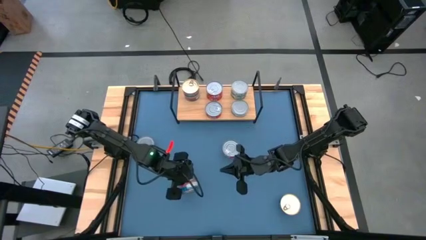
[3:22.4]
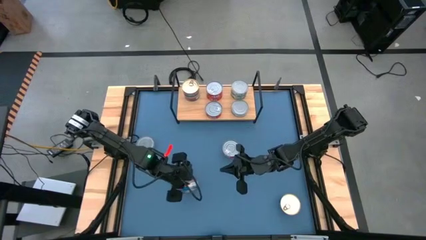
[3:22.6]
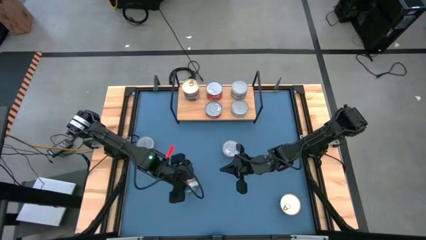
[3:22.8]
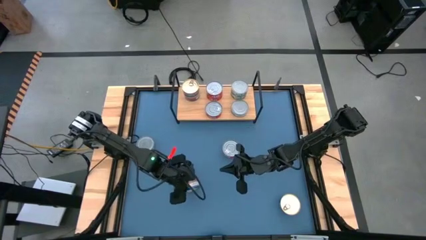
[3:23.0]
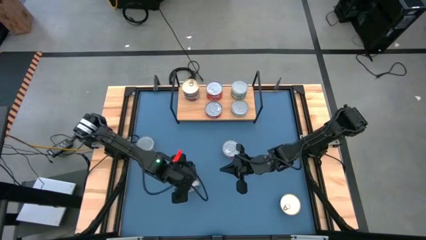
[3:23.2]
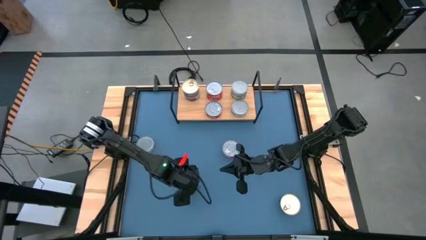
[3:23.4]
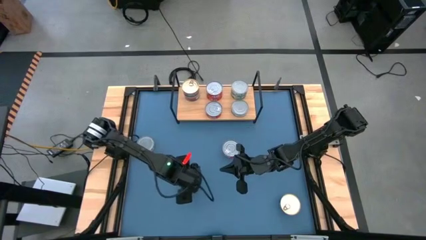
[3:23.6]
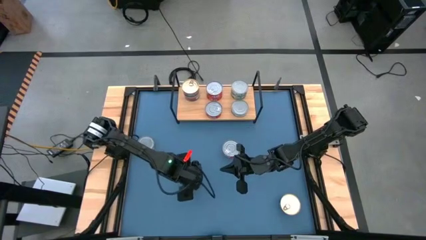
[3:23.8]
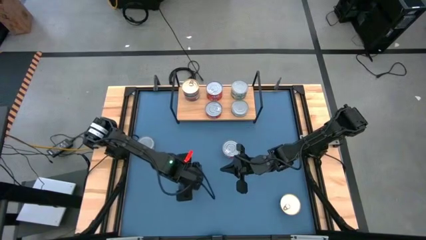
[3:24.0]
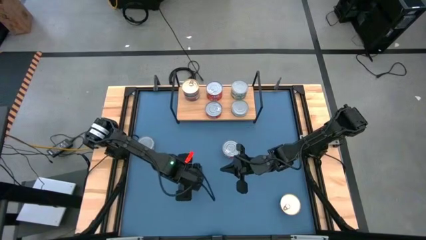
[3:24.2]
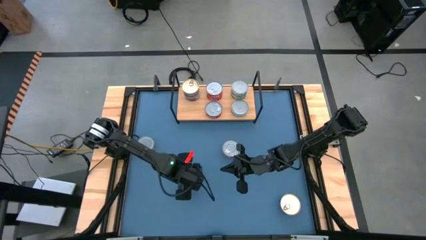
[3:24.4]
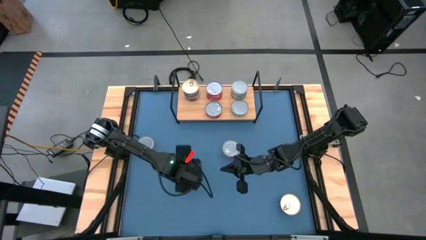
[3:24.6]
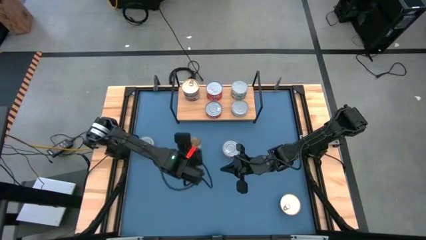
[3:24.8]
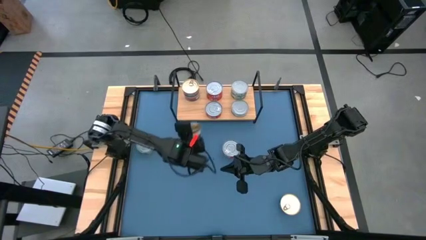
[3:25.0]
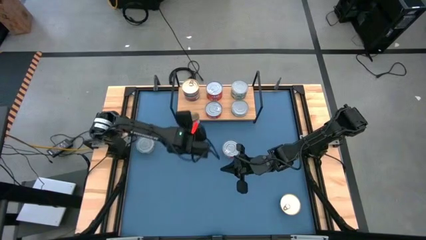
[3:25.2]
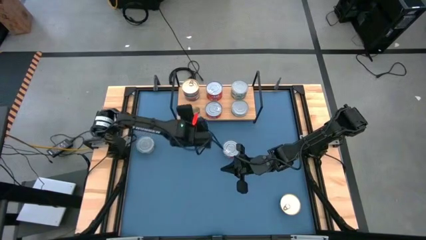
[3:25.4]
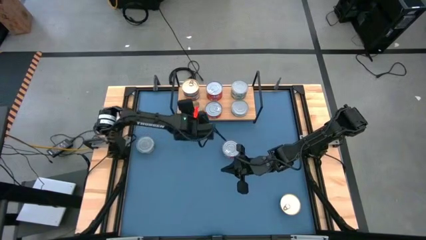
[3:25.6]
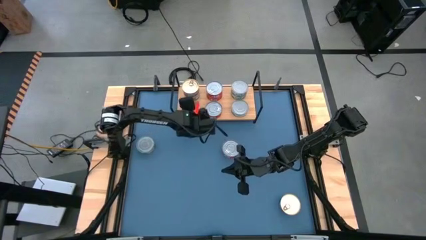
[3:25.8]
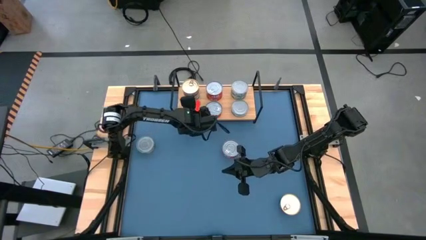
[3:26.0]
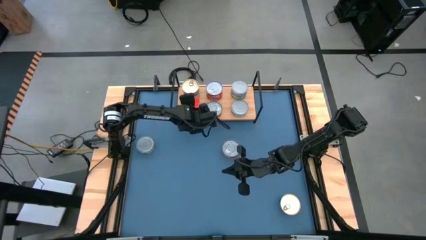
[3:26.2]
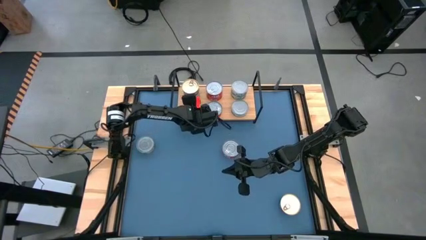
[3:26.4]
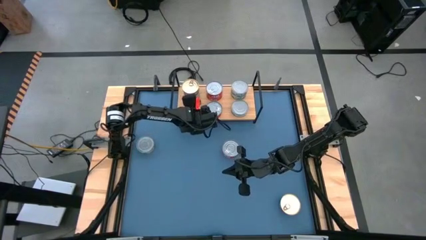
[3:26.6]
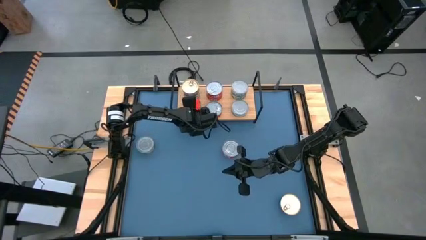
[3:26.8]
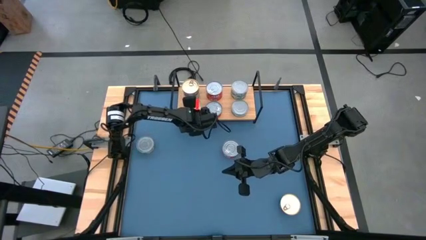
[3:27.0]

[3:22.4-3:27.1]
Task: Stack canned seafood by type on shelf
Put the blue tuna can on the shelf aligned with the other blue tuna cans

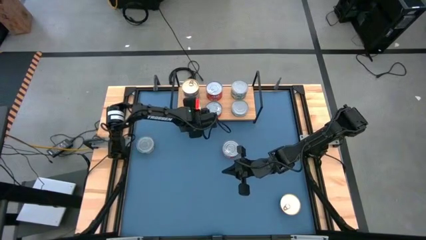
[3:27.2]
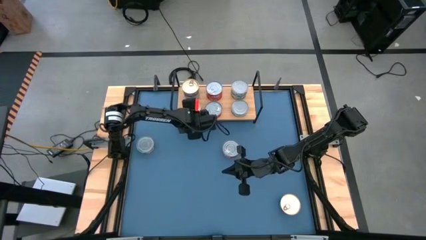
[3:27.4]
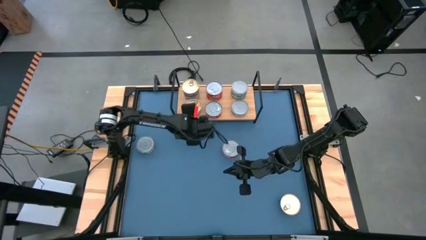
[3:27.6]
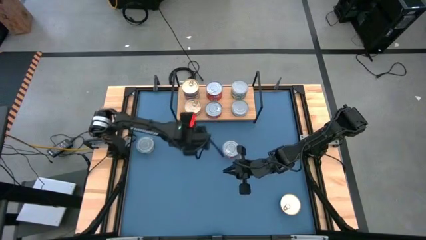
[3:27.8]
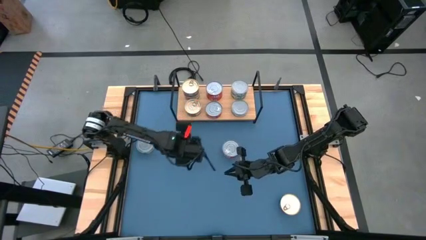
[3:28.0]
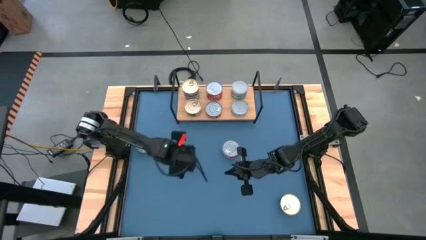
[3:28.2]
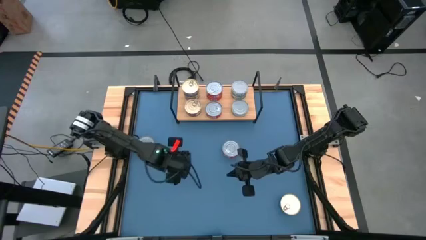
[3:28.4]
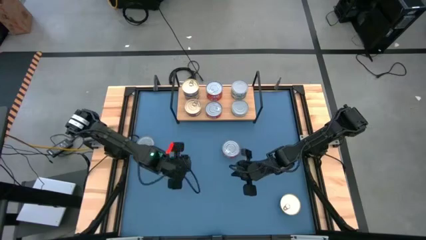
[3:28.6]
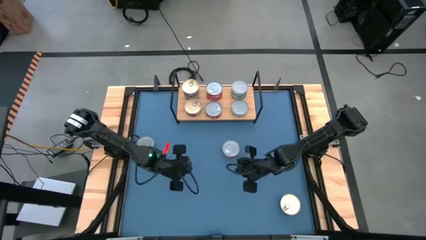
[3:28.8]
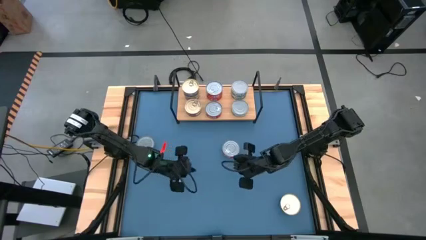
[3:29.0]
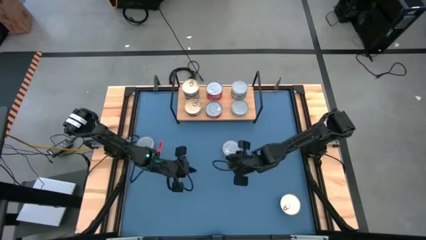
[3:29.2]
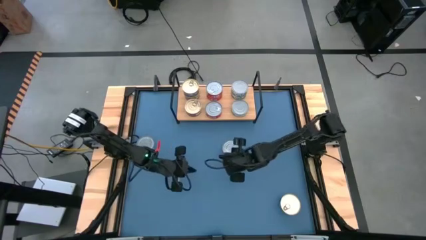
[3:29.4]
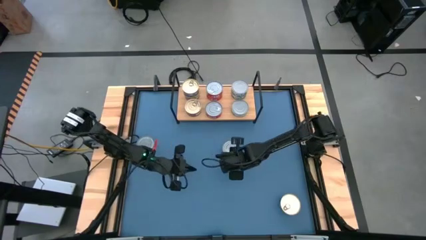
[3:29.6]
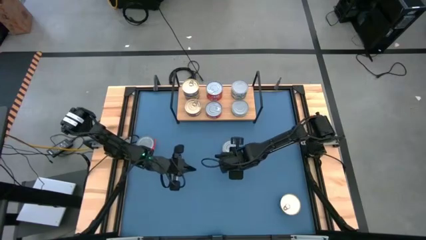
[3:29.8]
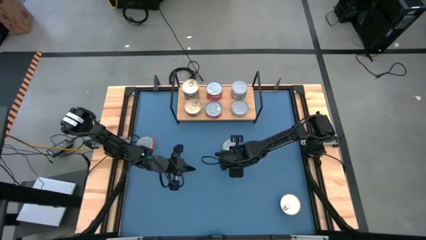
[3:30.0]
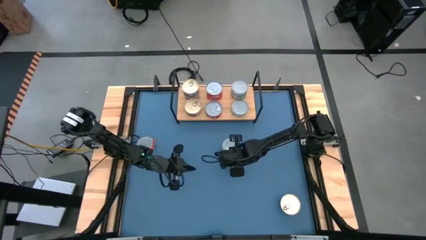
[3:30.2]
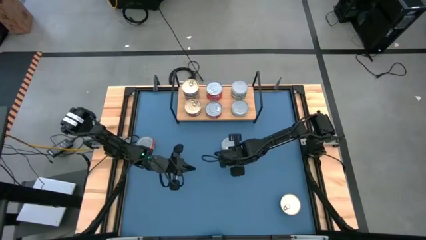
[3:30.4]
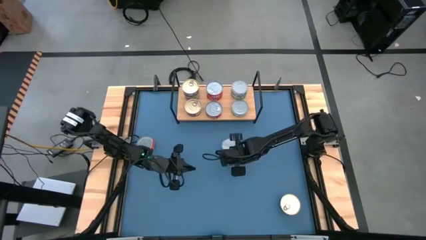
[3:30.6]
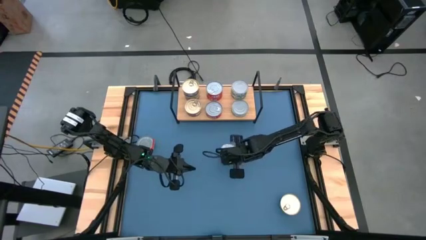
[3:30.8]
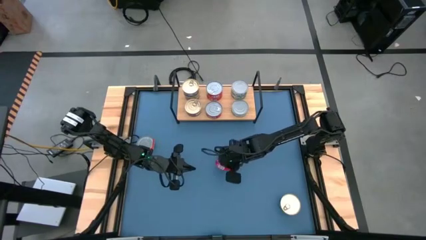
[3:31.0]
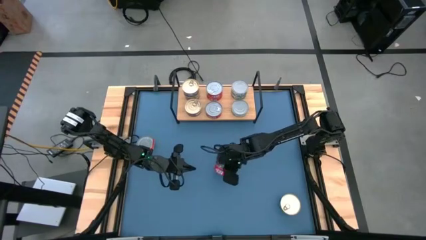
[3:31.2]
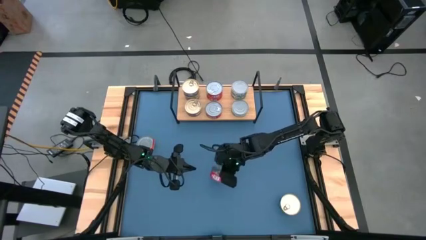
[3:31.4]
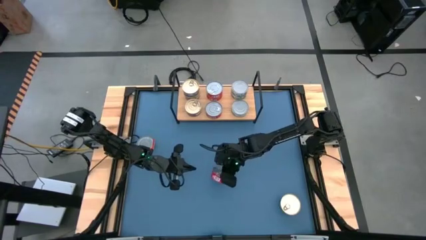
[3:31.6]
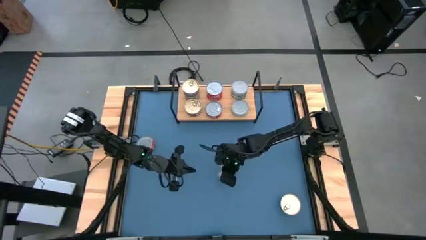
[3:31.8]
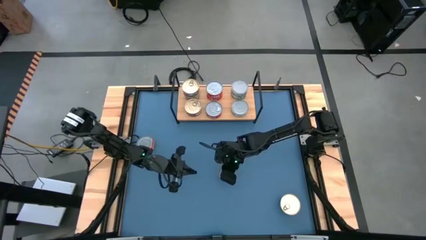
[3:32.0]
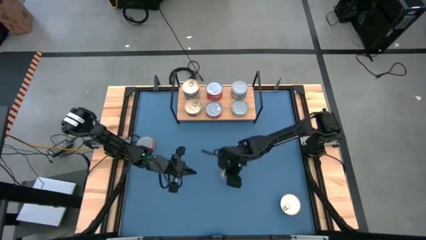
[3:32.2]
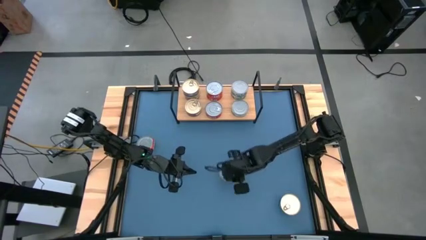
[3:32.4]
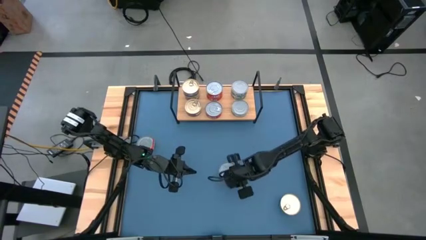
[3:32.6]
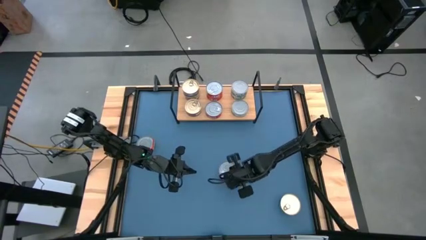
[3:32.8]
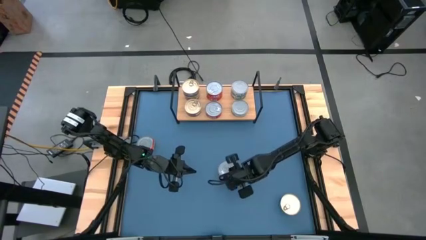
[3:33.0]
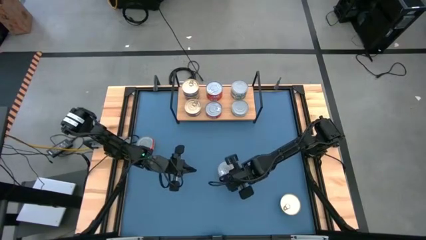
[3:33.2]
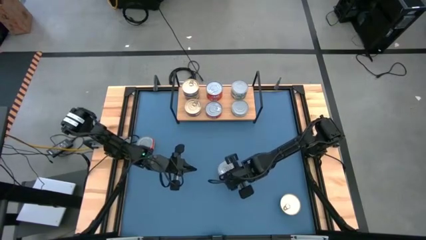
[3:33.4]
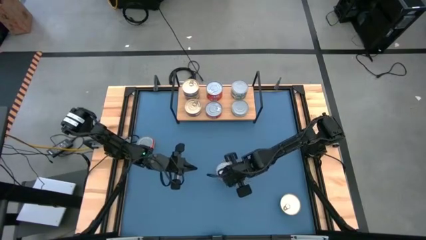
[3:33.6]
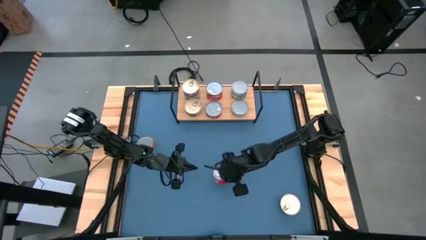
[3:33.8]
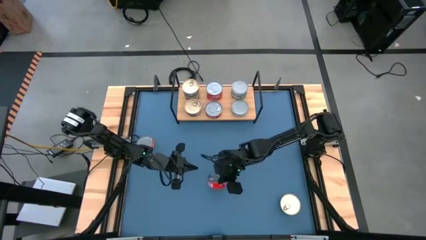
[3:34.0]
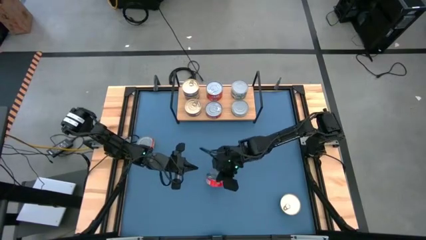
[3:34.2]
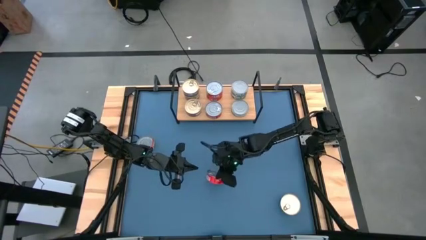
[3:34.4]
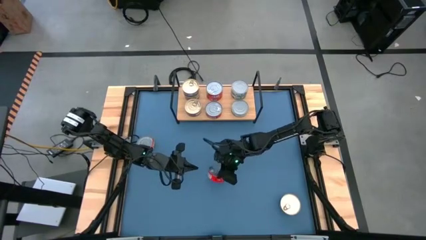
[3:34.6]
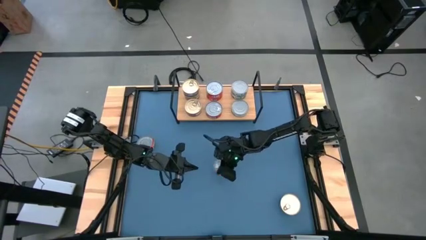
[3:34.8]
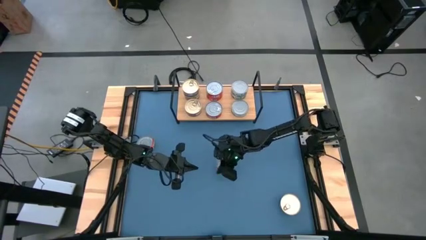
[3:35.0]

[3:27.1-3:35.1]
Stack the red tuna can on top of the other red tuna can on the shelf

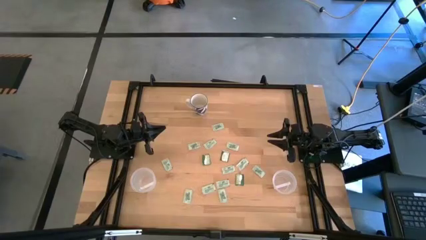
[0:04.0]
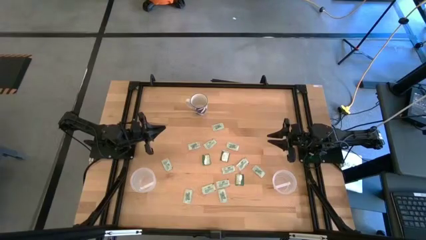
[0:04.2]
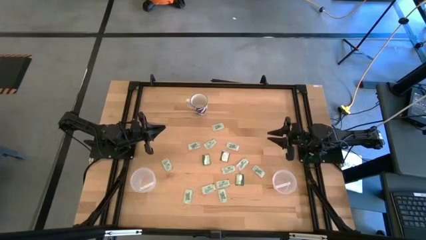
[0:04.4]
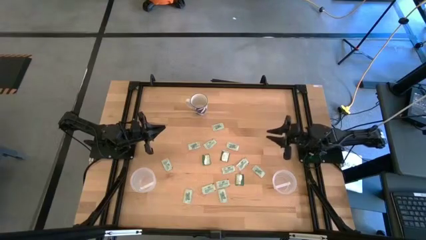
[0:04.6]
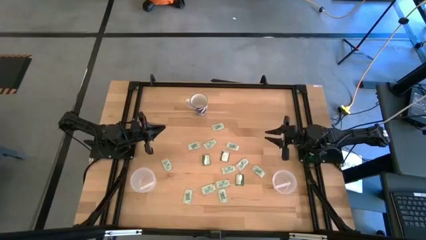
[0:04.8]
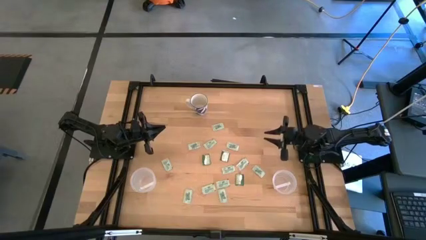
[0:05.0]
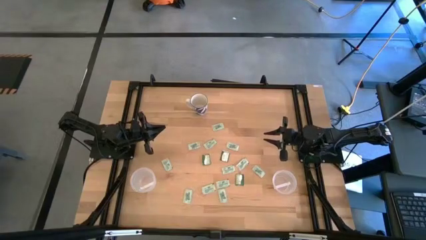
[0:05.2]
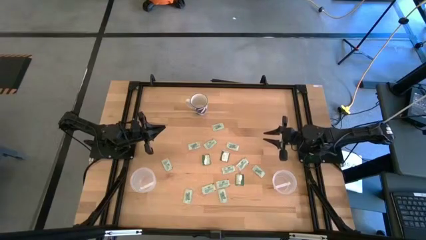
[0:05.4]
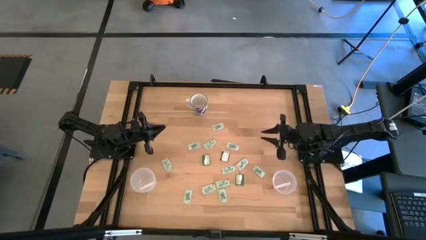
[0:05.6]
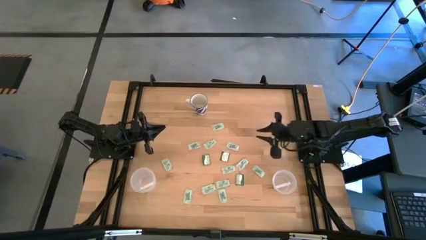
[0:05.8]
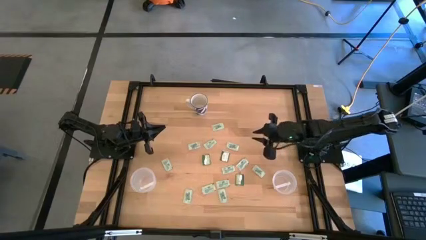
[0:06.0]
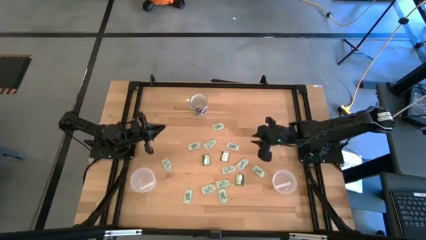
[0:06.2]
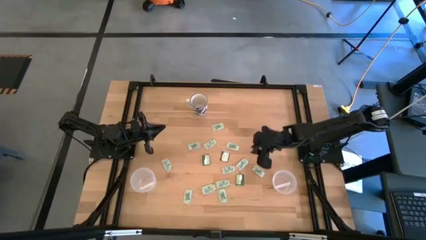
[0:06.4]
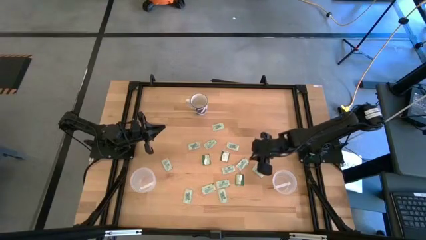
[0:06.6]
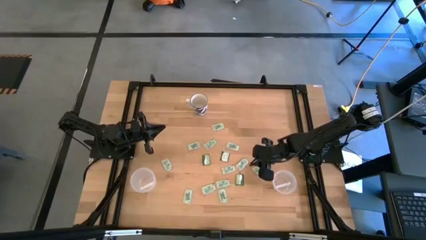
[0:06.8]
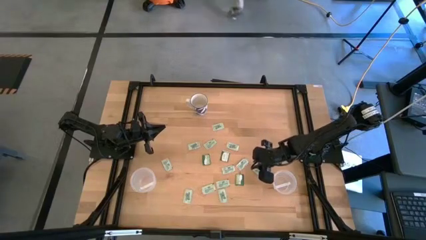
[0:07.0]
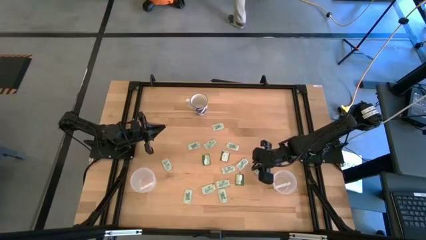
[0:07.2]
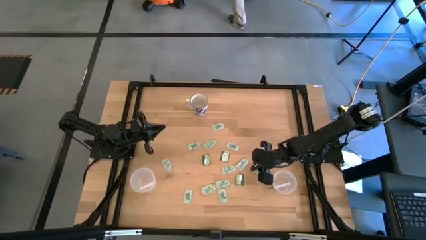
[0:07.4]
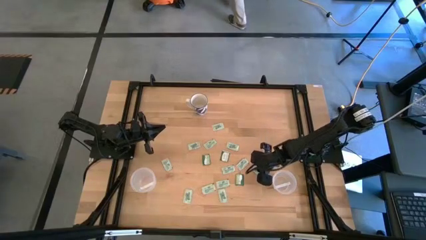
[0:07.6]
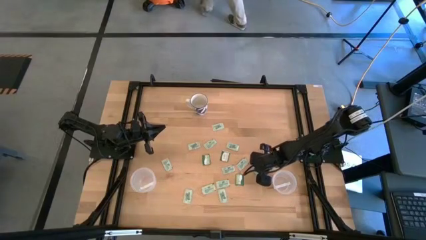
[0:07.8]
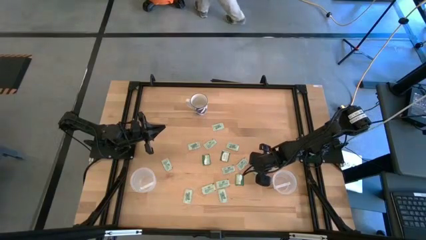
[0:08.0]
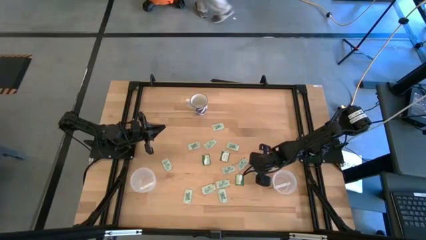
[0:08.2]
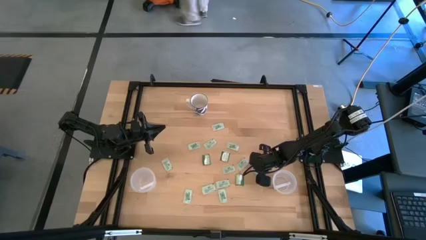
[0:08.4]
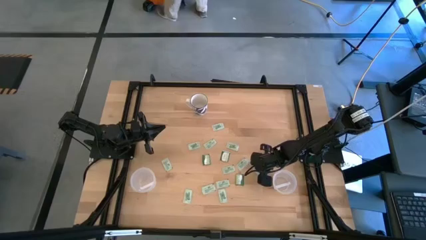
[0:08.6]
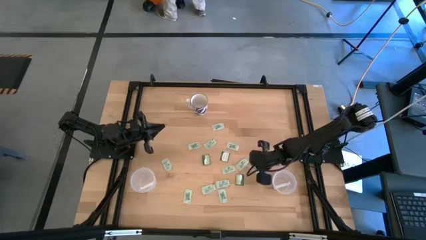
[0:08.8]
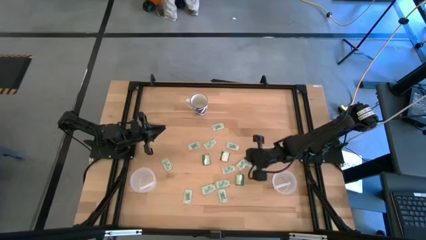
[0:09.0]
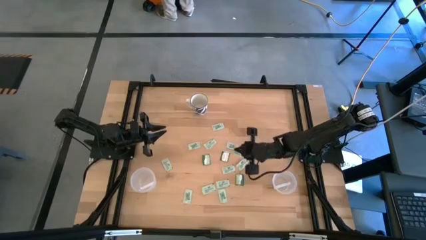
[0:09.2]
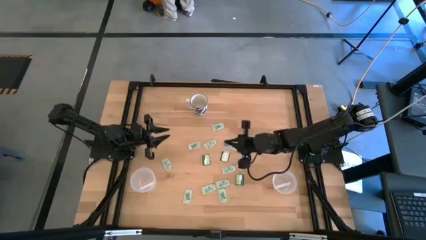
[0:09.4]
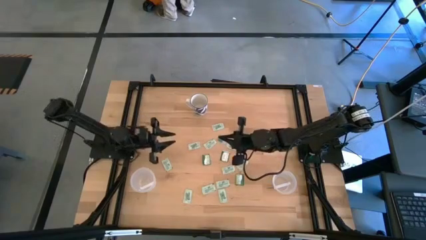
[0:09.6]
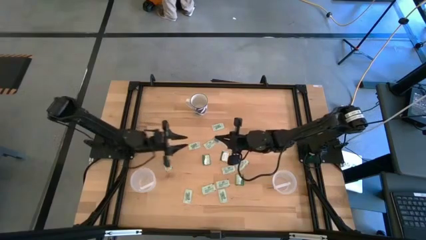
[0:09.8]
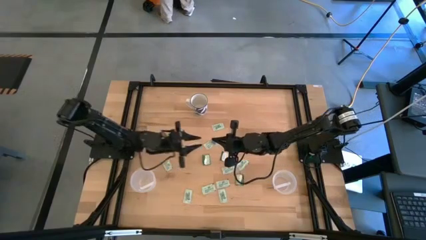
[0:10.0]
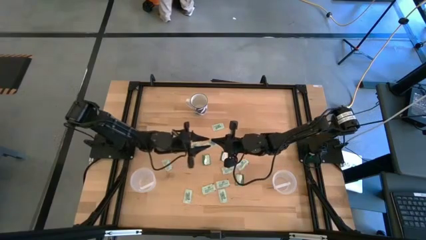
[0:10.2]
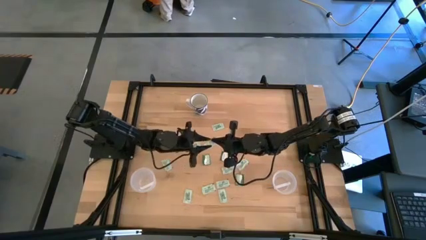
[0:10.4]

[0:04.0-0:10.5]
Task: Pick and place Stevia / Truvia into bins
Put the light green stevia packet into the left transparent container
